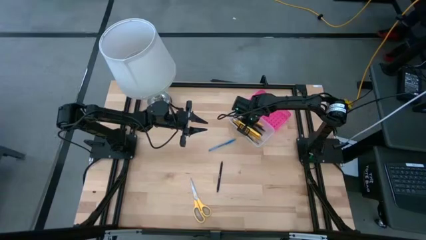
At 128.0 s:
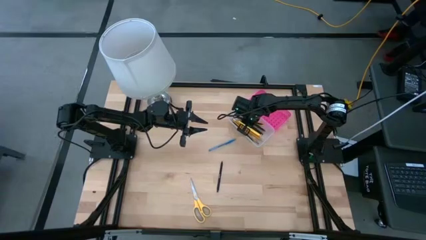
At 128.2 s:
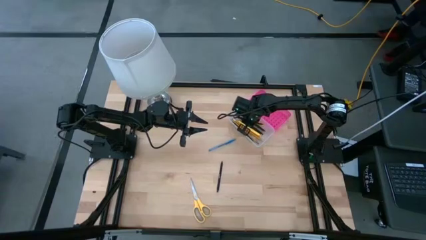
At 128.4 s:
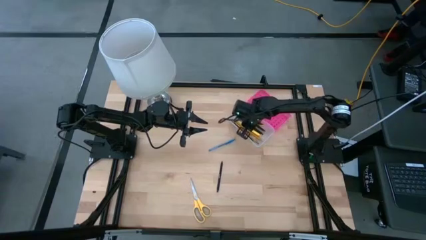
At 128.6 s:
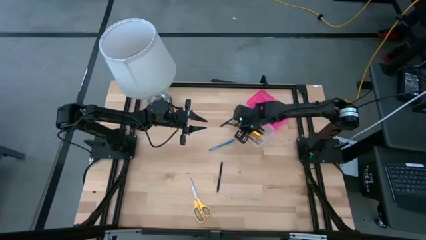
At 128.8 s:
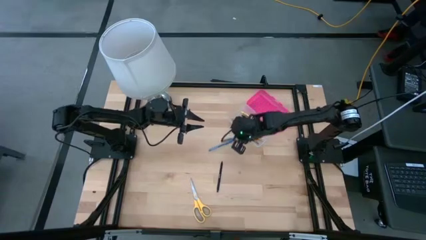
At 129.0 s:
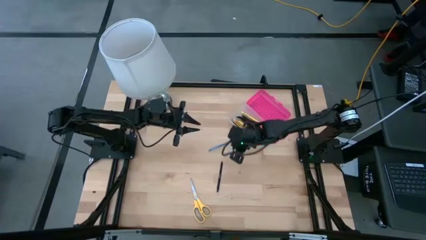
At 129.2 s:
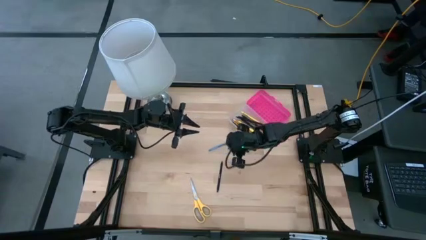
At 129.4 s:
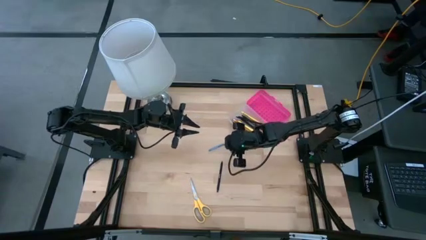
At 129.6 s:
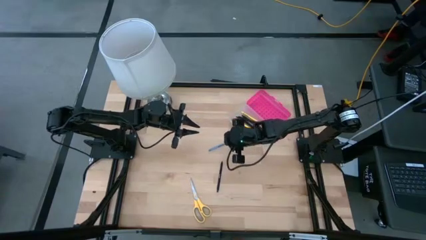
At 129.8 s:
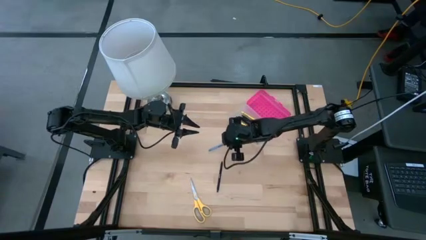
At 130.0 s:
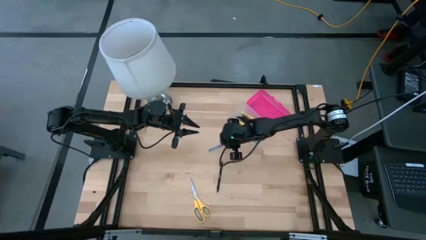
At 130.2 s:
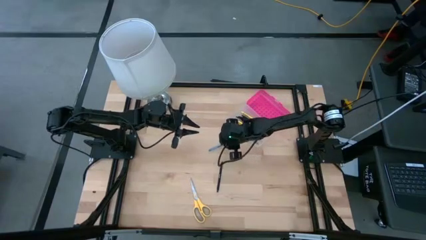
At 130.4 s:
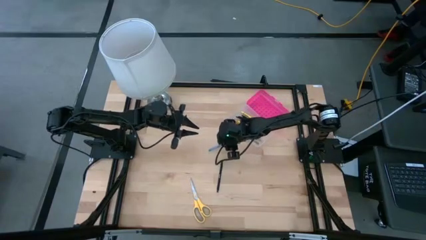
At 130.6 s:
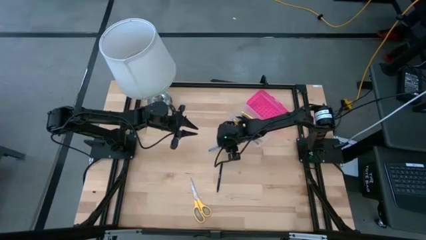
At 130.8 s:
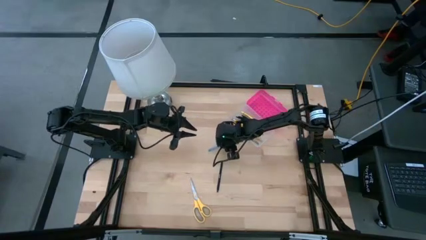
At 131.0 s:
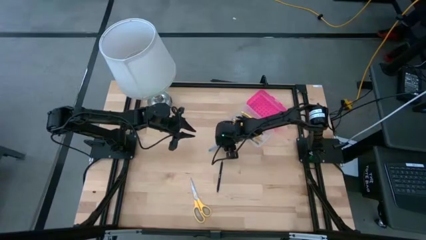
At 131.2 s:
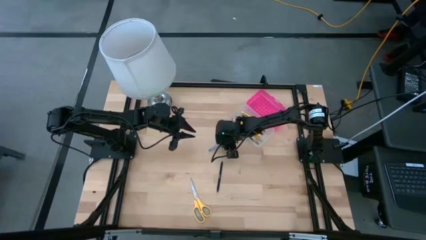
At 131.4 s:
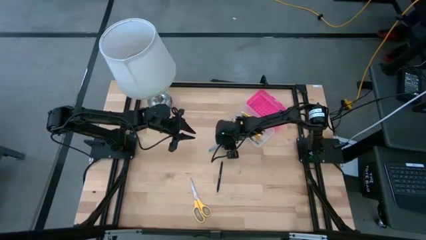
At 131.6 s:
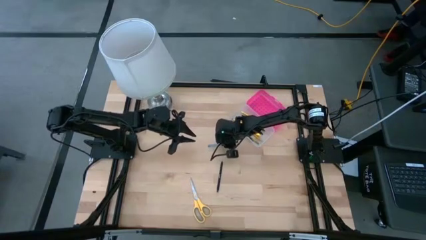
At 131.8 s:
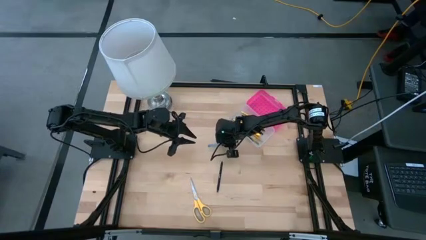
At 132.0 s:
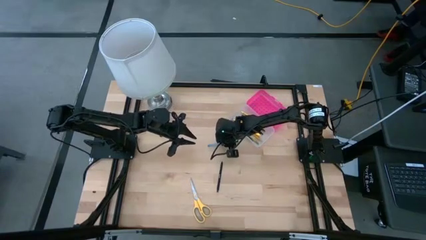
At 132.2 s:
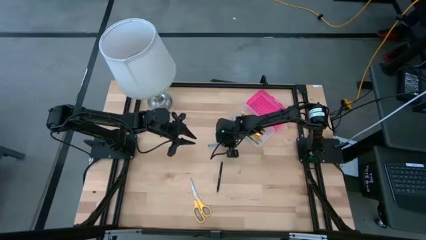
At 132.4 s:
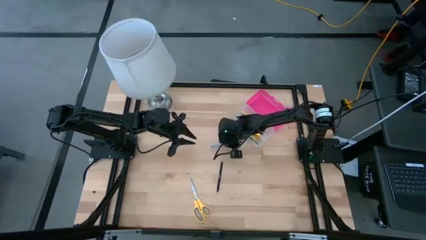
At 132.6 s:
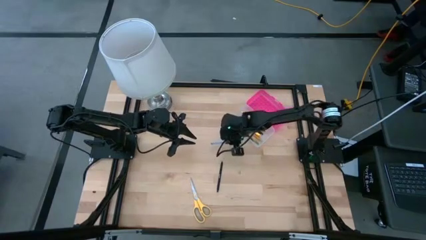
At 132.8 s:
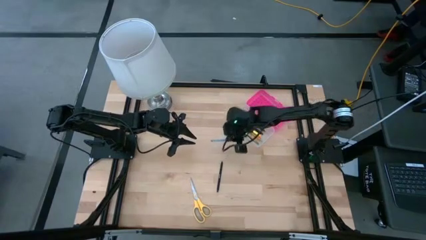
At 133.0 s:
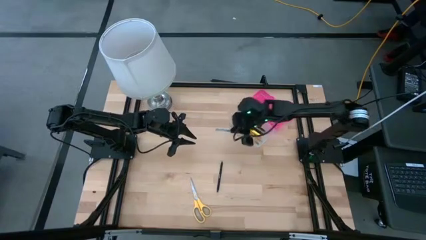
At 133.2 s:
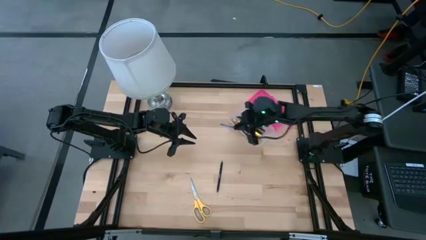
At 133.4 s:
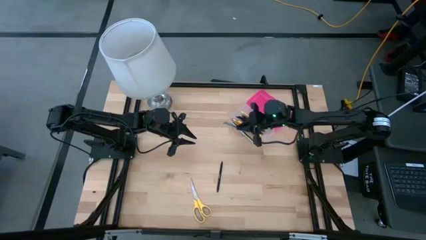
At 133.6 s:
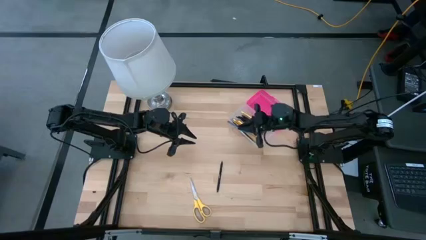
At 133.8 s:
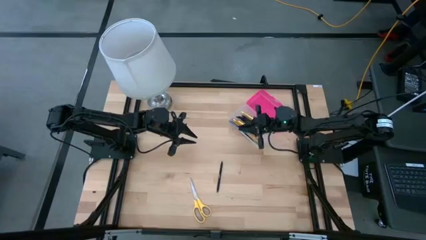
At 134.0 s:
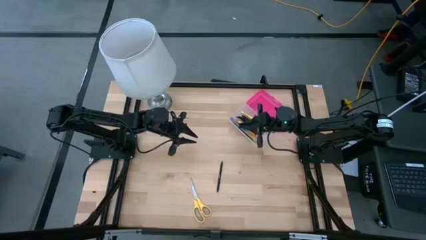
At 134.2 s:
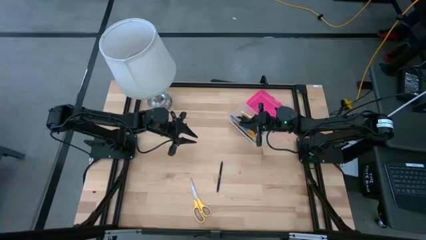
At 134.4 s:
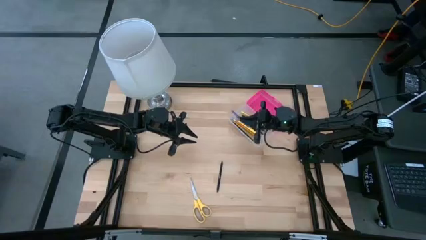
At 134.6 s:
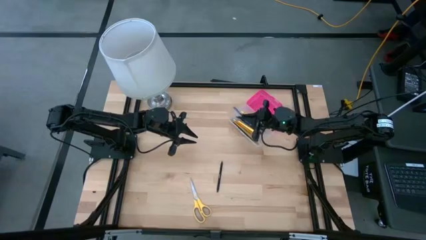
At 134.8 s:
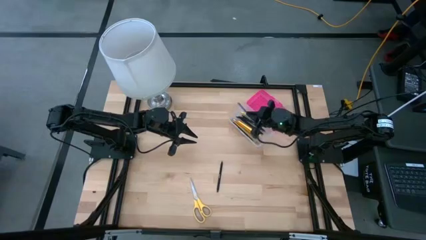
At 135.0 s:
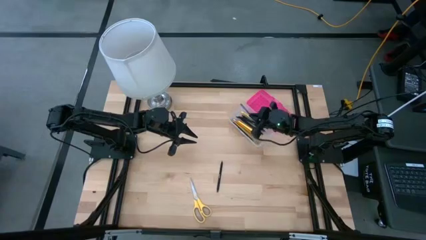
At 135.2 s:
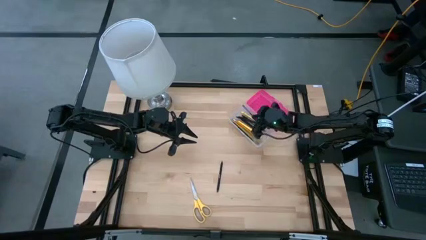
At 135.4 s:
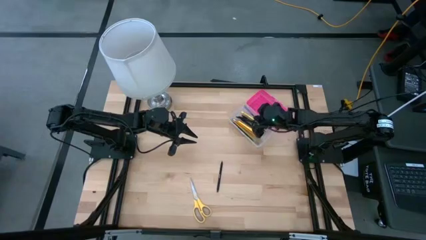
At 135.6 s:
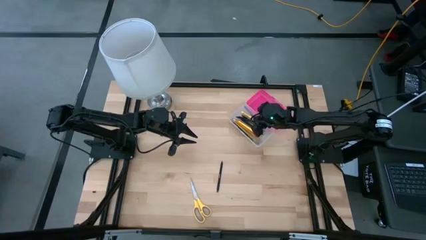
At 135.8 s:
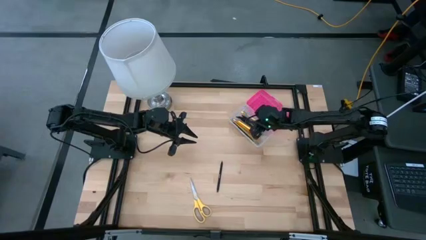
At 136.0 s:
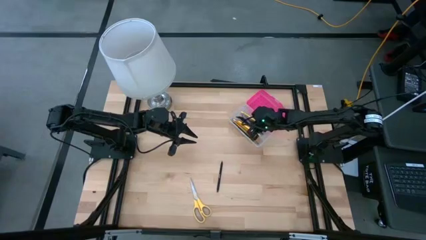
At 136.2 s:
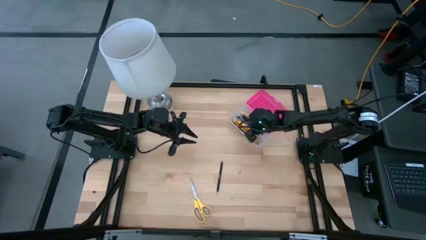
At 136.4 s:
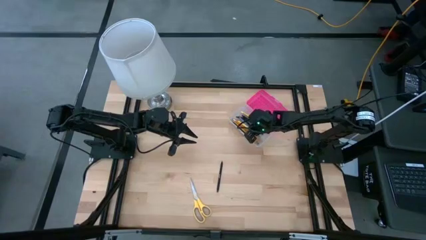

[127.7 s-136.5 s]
Task: Pick & place school supplies into a supply box
Put the blue pen into the pink supply box

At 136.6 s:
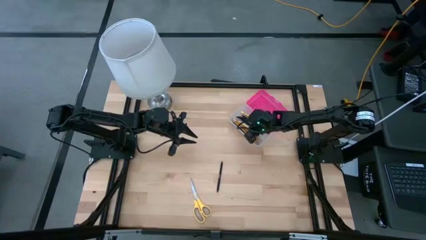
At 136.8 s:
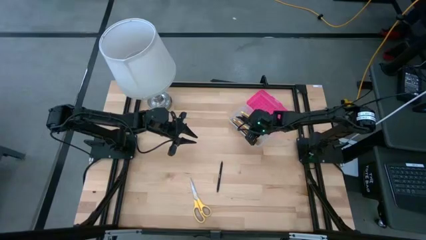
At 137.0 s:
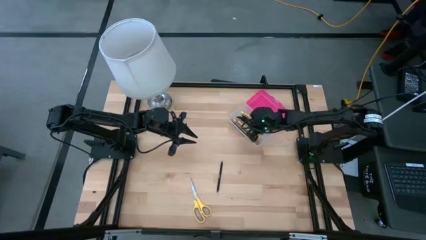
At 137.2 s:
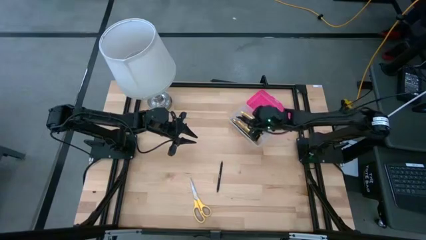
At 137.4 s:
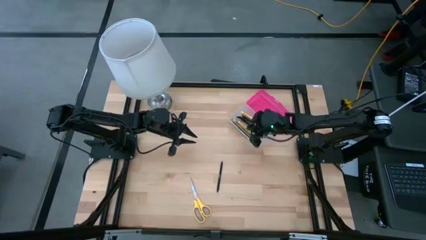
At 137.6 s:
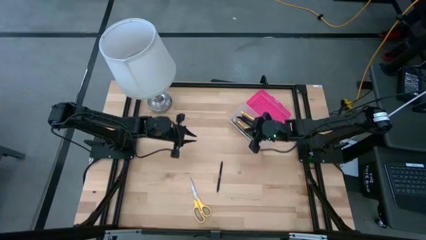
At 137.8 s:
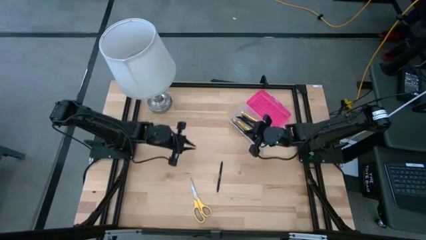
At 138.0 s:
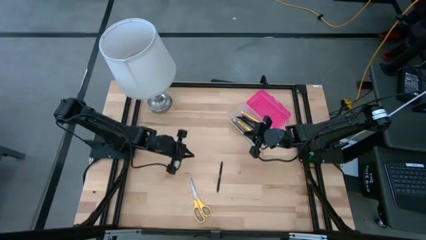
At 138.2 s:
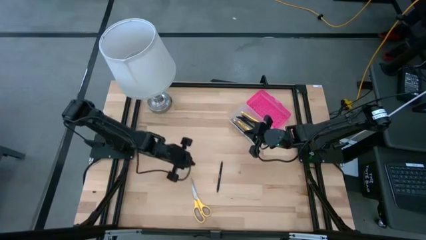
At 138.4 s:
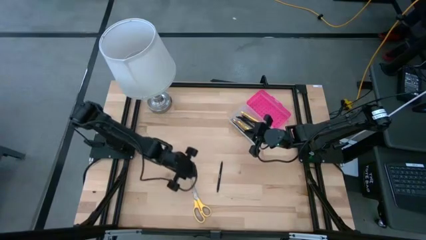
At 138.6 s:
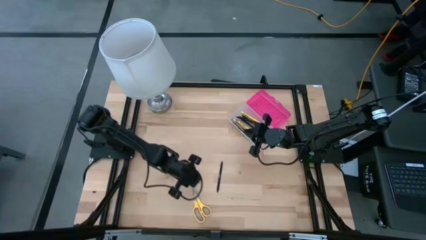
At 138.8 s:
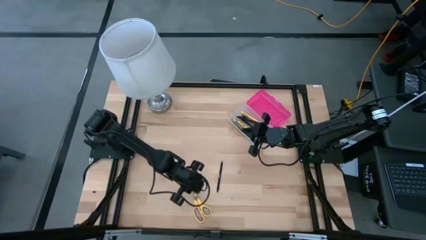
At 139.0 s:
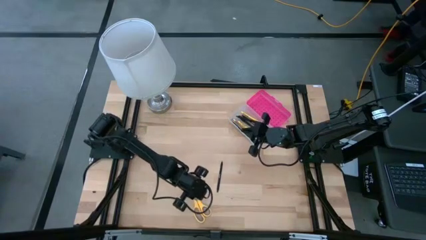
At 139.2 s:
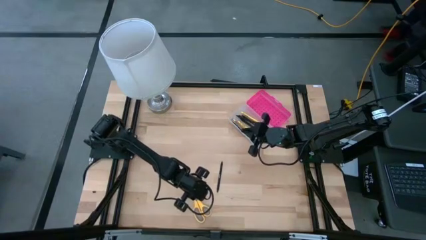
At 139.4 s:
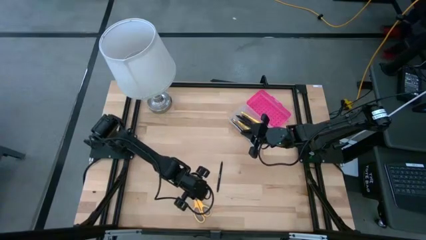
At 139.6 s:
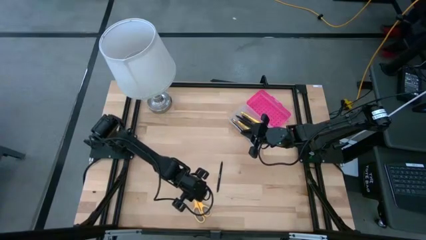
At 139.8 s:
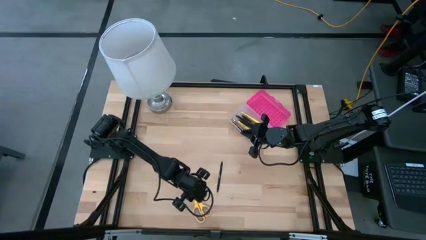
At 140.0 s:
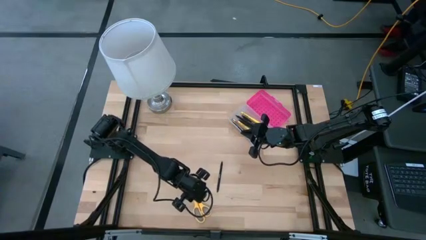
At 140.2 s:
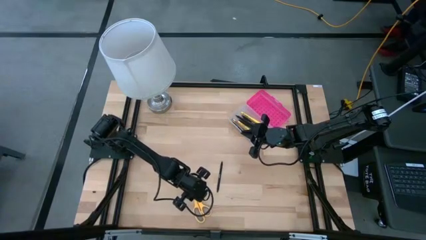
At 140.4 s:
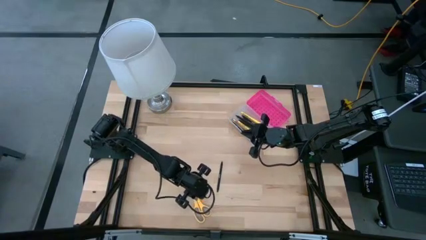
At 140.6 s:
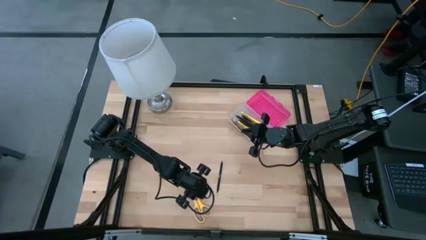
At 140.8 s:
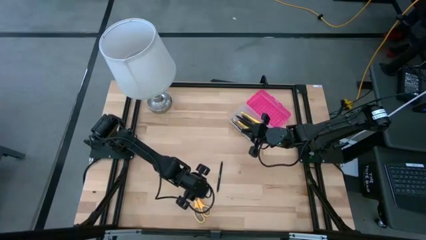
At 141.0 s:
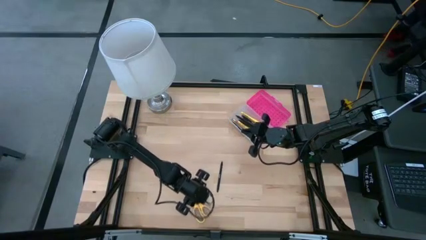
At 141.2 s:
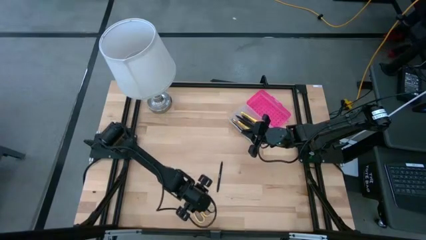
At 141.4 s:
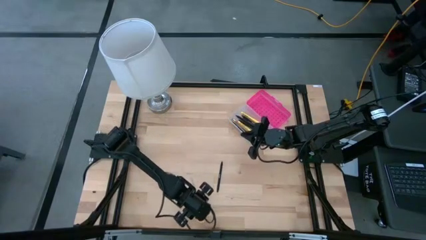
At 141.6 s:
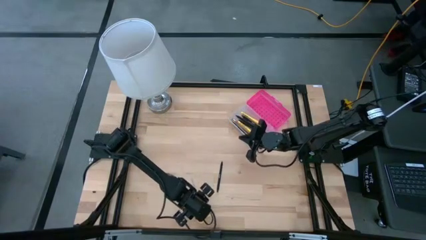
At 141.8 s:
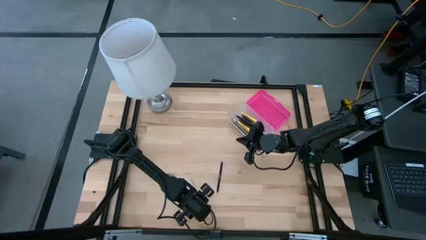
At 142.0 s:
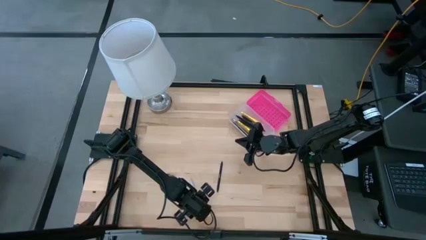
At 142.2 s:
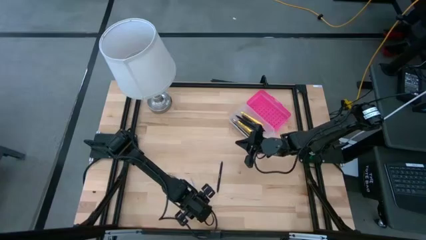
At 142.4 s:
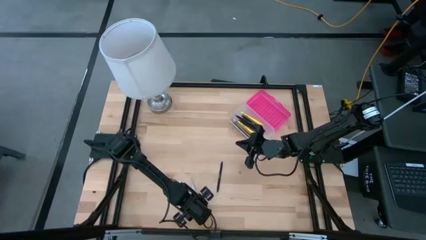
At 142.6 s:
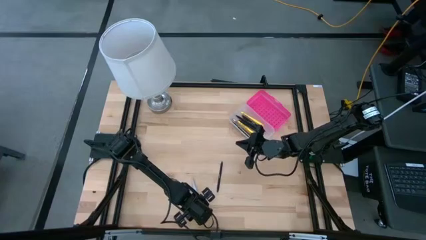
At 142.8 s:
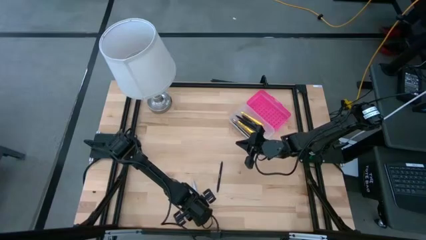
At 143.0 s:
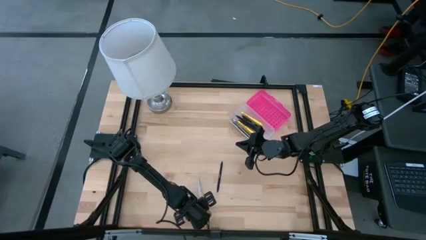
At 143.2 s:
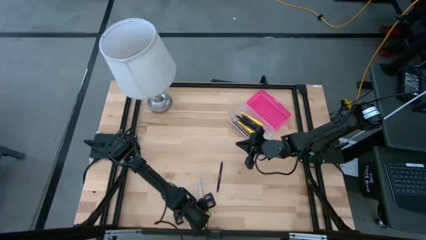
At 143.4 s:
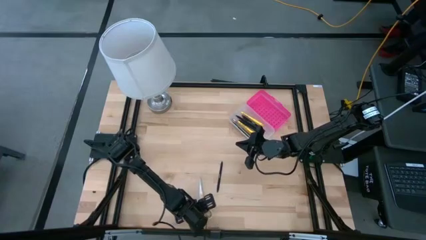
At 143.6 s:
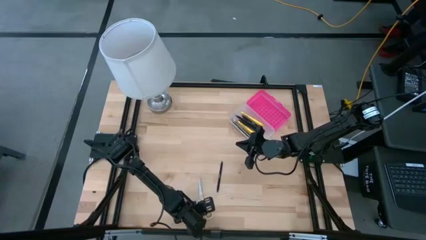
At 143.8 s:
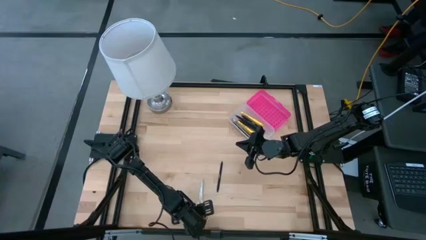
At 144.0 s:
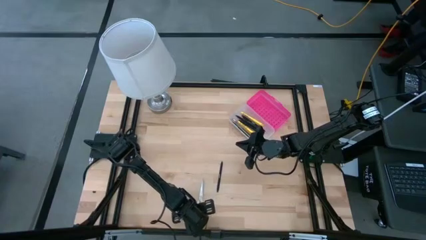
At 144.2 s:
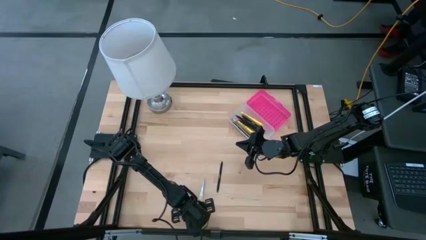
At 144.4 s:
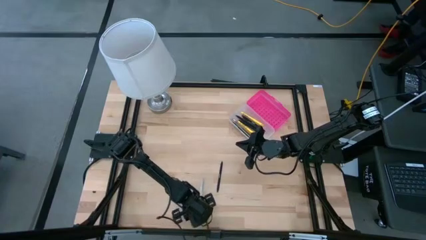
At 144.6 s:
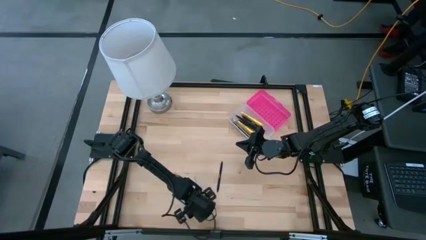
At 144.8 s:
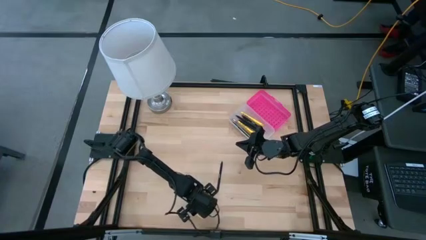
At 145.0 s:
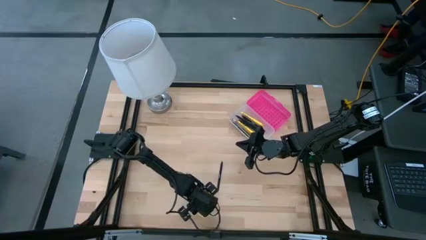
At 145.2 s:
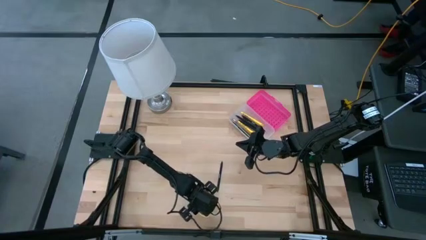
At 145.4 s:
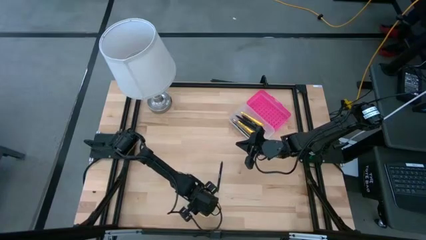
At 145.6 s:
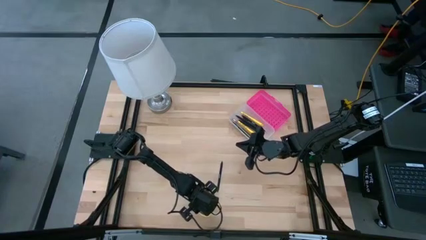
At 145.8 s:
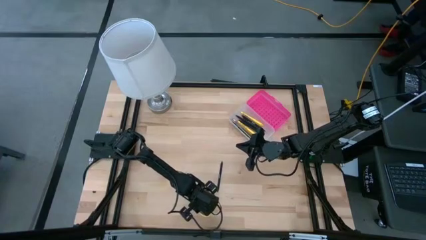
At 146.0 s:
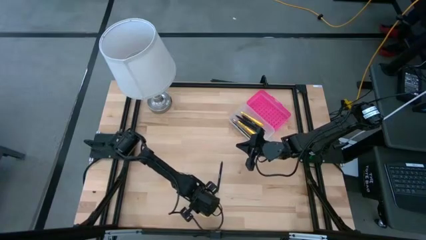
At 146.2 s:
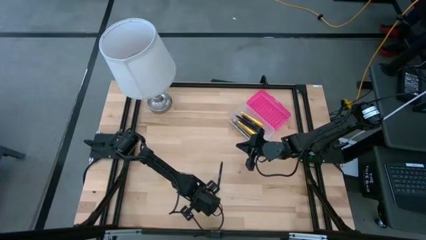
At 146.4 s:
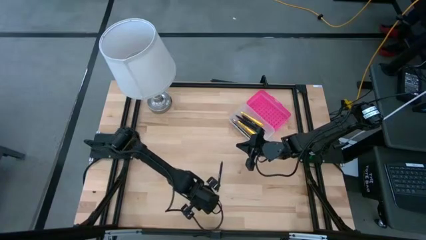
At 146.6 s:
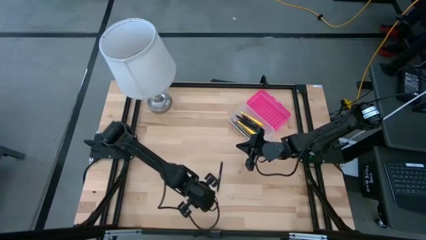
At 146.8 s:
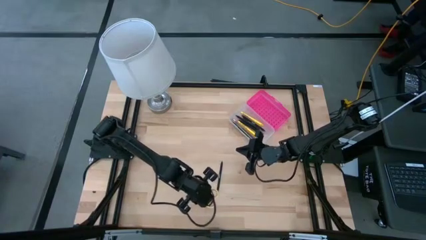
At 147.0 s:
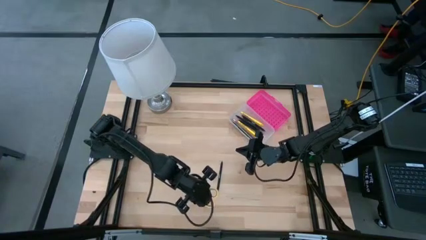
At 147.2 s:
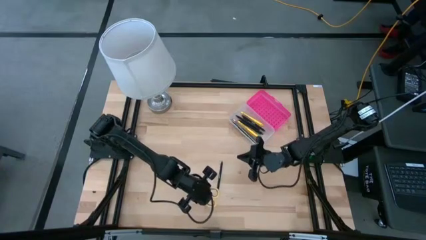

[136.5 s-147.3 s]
Put the yellow scissors into the pink supply box
